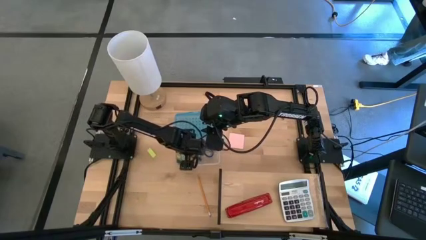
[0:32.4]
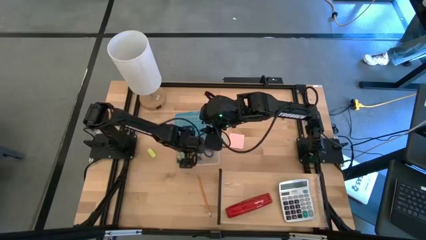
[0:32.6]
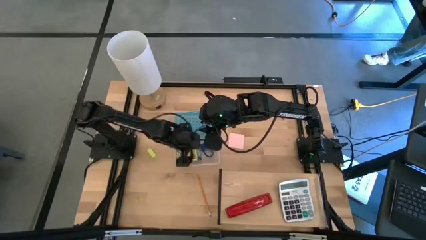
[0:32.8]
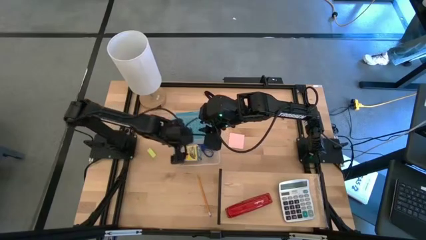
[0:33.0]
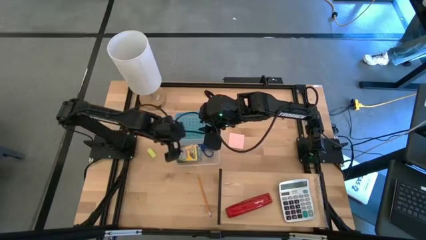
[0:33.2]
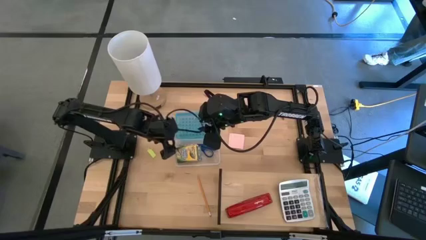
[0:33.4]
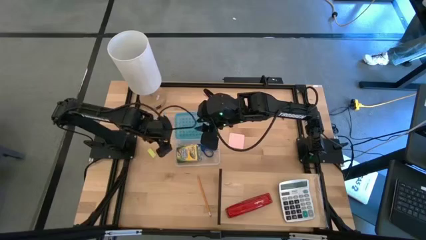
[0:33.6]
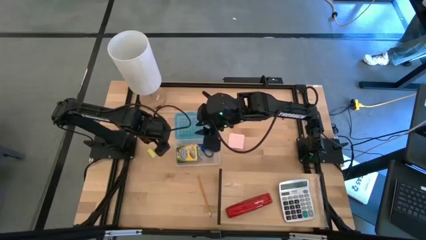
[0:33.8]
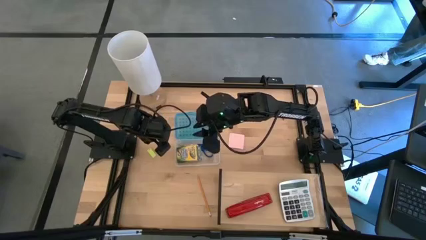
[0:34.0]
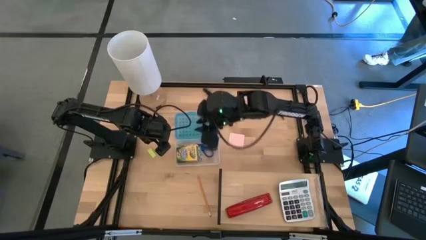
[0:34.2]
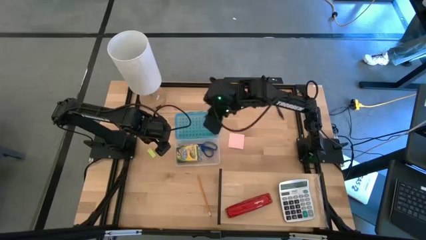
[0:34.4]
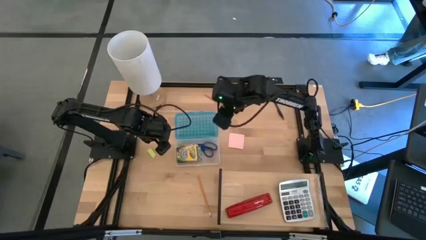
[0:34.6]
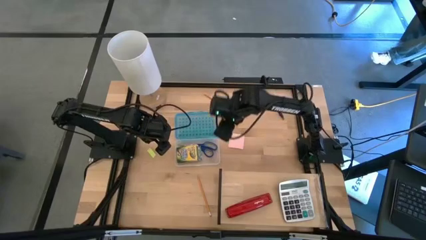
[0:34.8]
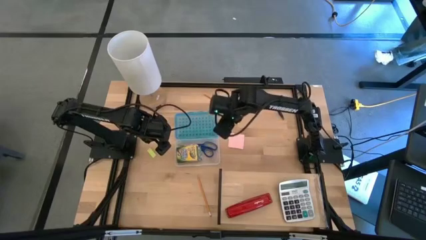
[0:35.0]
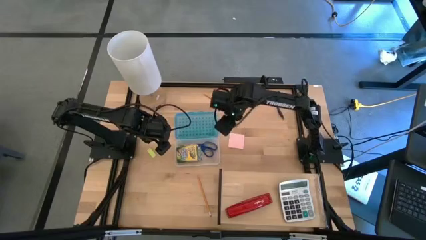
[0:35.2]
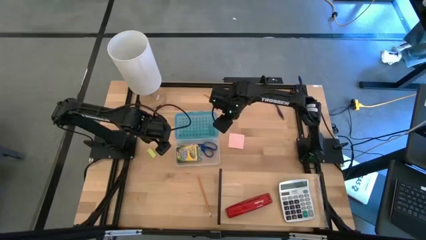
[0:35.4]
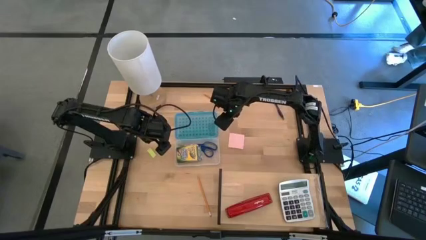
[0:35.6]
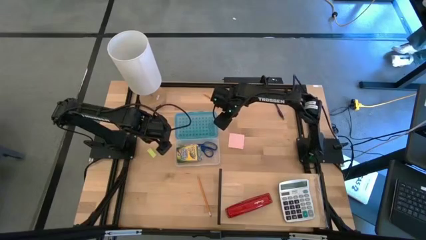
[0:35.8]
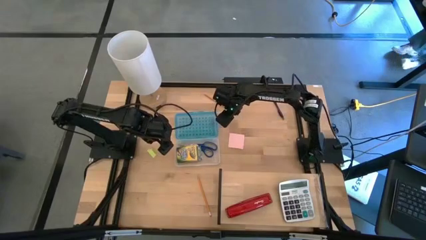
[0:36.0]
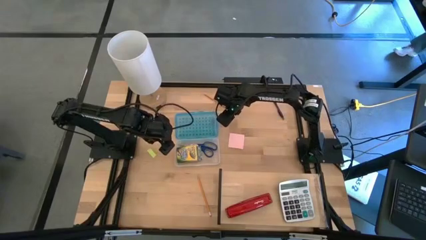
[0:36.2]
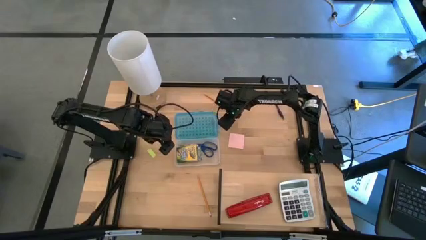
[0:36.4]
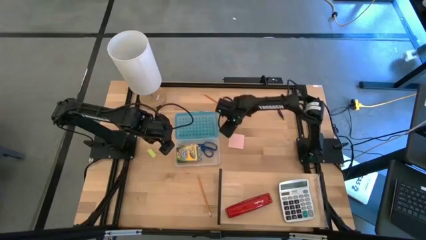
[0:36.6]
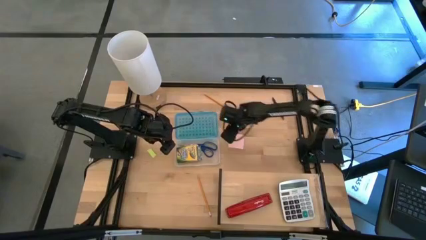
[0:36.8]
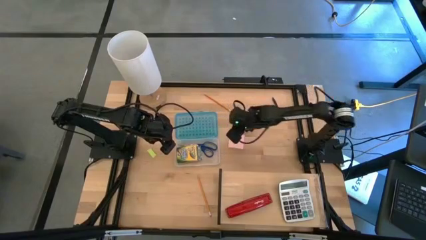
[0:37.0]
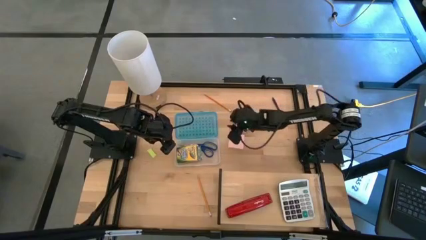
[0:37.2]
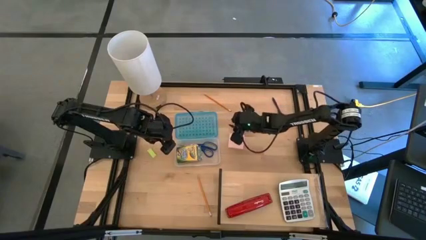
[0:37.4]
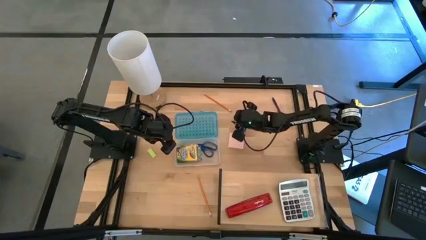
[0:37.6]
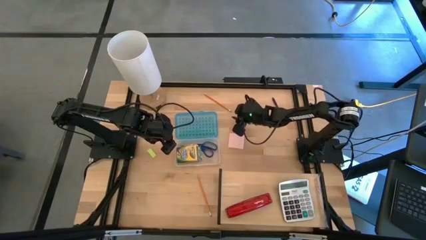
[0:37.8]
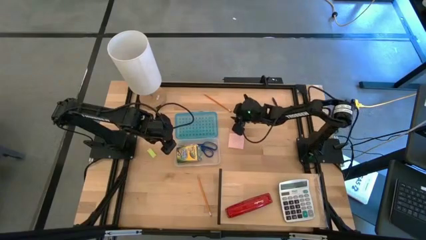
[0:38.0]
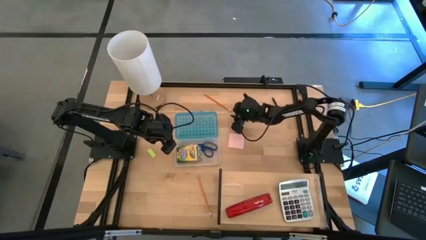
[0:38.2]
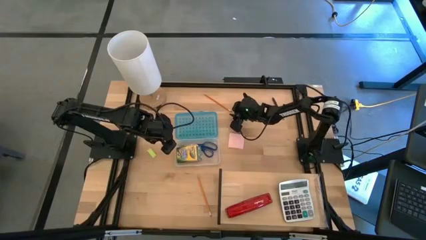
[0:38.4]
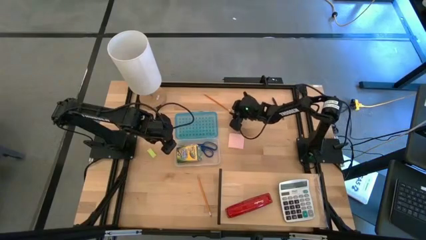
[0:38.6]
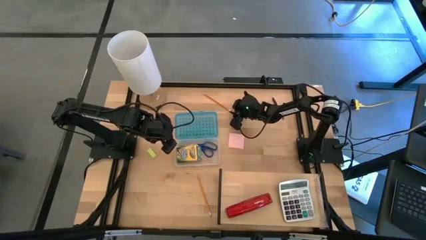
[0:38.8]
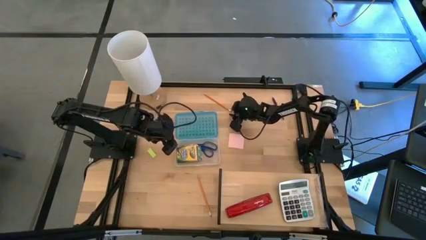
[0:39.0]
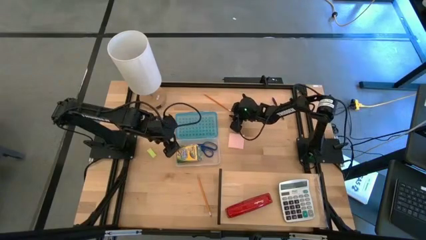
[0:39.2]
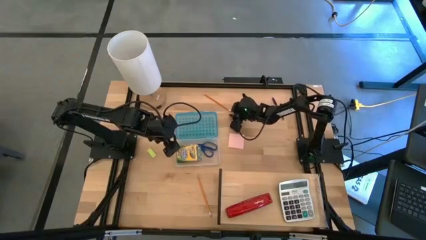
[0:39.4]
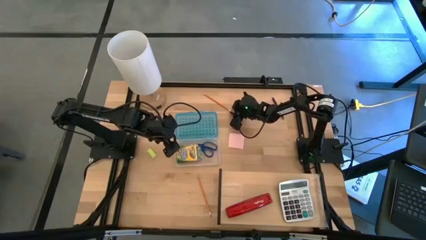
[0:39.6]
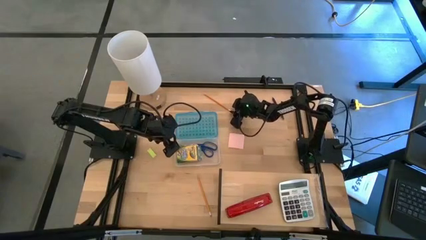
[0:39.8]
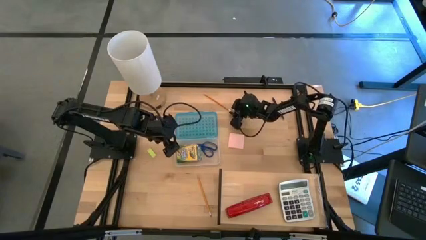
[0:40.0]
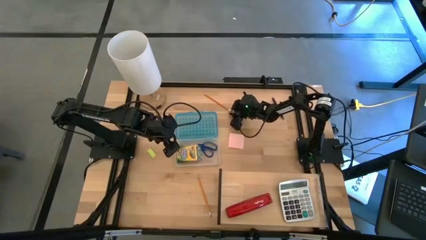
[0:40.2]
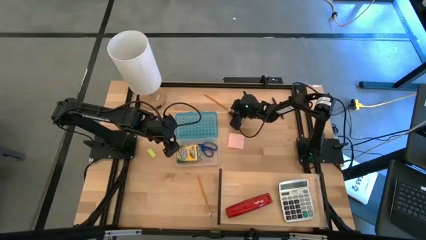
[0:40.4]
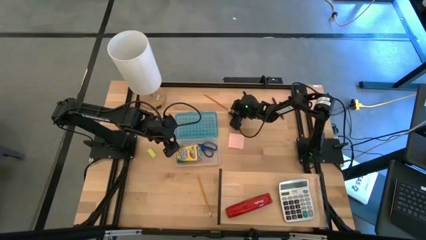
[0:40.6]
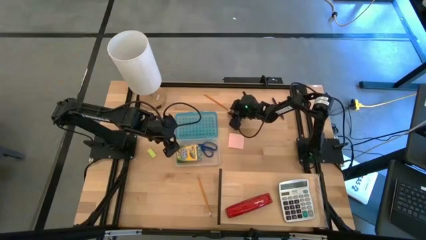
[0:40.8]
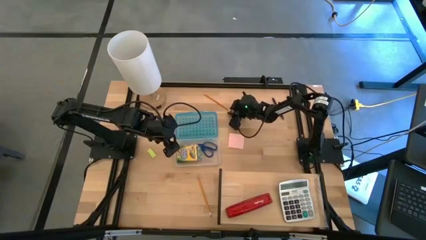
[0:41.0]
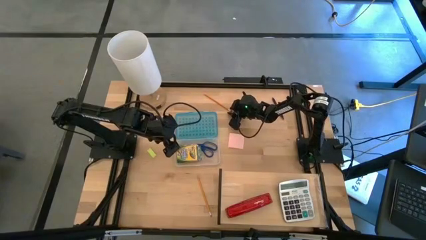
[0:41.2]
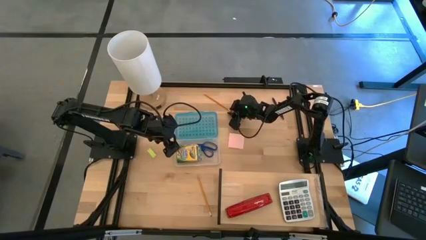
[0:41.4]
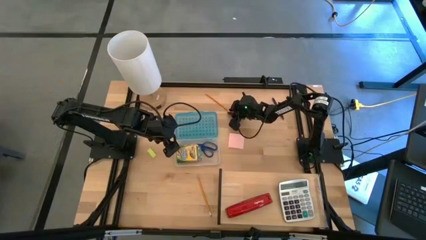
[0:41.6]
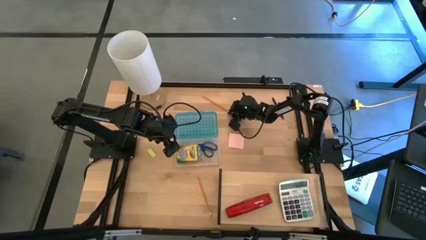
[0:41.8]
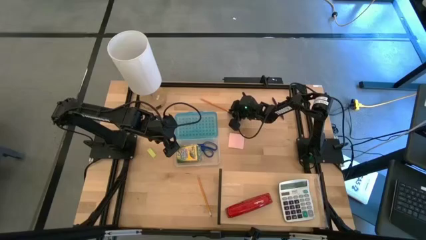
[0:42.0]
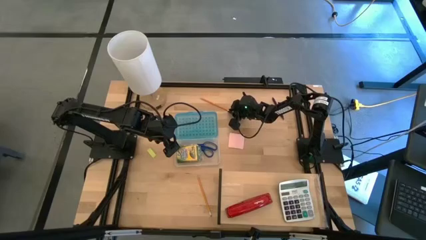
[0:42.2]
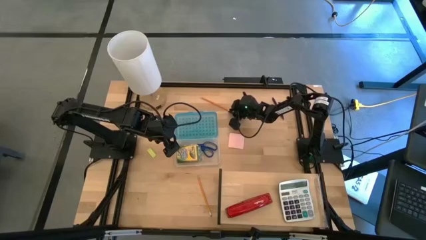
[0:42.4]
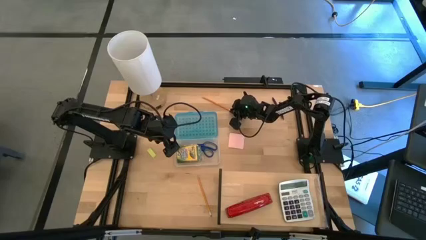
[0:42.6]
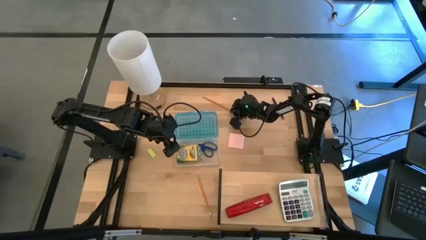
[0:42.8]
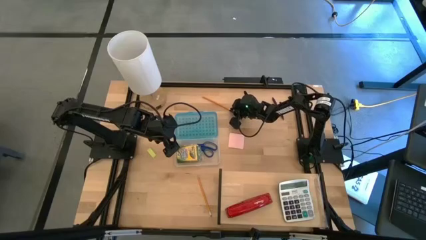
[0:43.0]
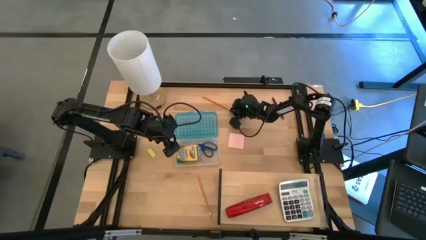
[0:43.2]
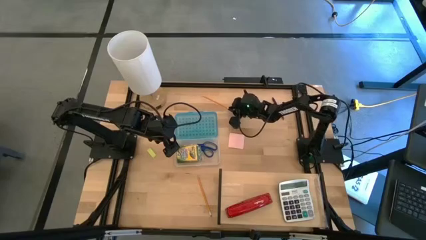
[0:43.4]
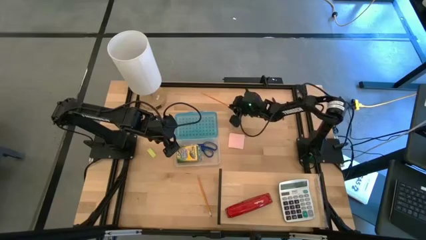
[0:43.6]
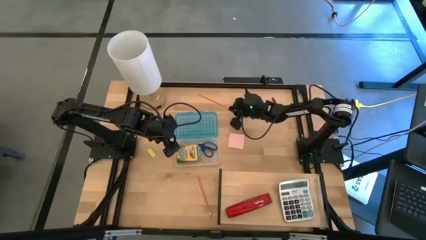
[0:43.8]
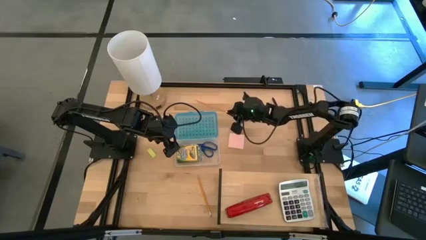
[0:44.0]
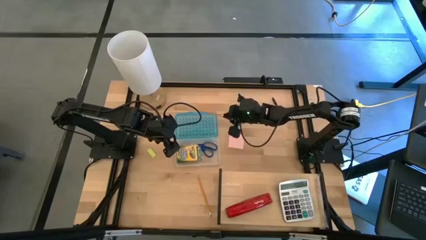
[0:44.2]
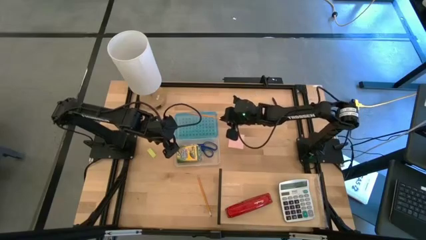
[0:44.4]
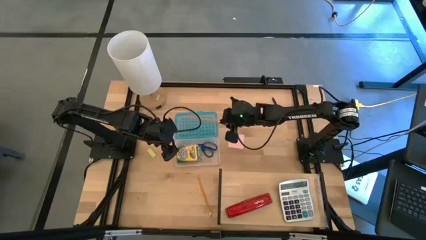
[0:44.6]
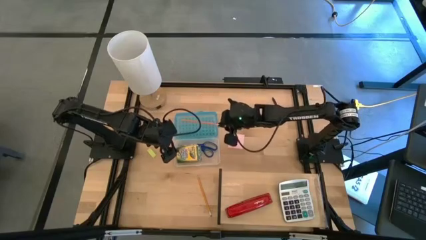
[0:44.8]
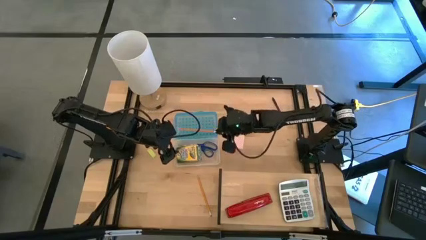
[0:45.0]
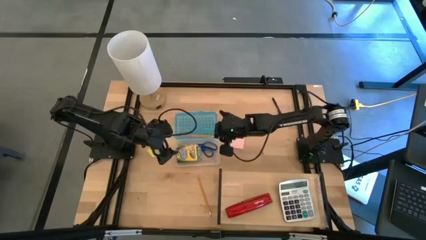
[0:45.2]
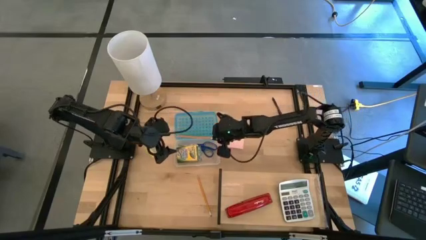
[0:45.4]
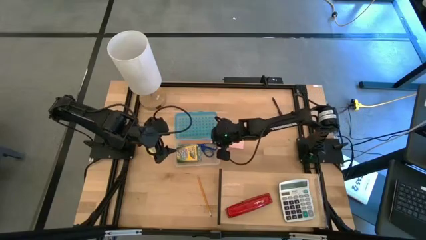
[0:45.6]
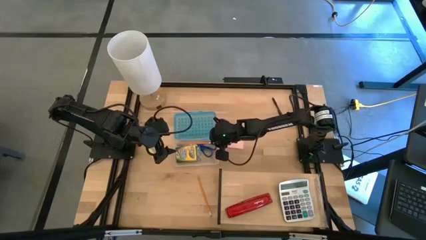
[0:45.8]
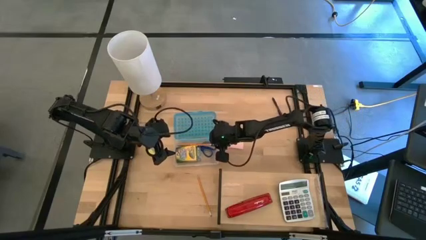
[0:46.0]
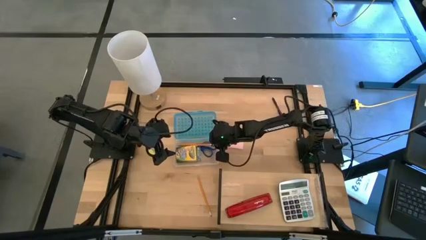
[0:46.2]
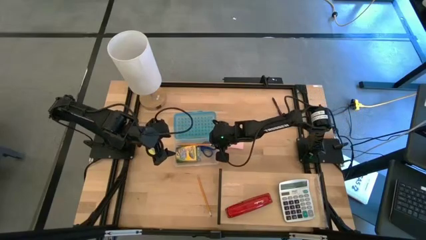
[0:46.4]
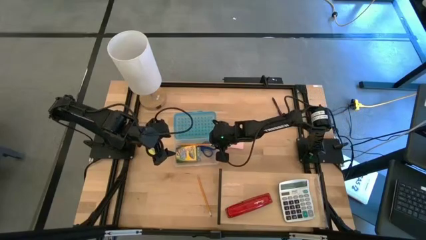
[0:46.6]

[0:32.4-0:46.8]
Task: Pack school essentials
Put the top orange pencil into the blue supply box

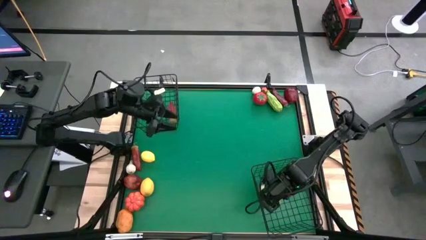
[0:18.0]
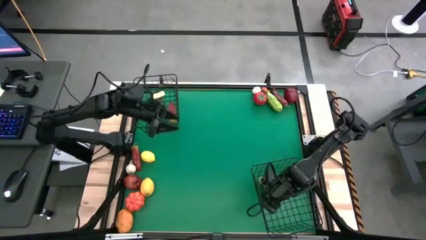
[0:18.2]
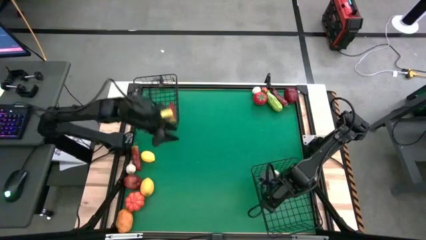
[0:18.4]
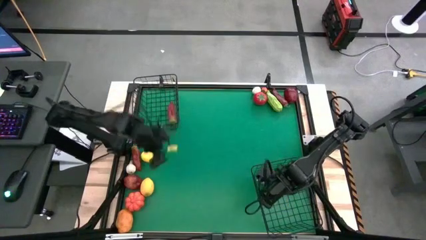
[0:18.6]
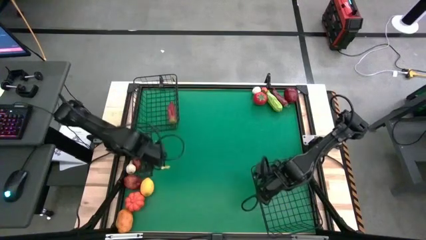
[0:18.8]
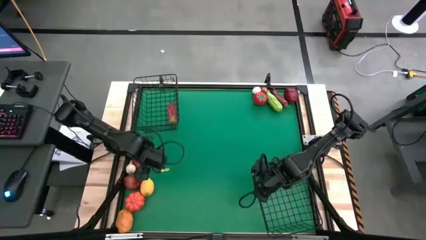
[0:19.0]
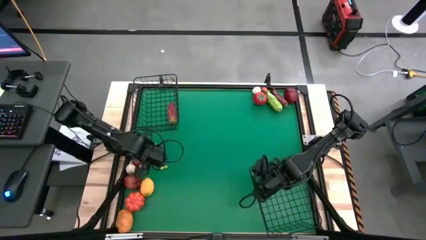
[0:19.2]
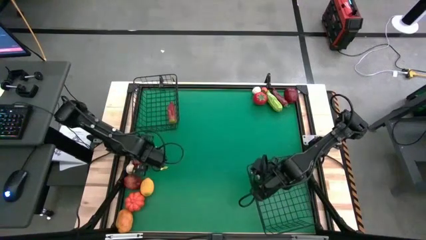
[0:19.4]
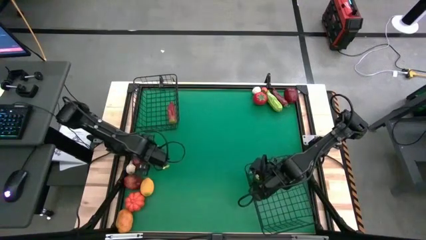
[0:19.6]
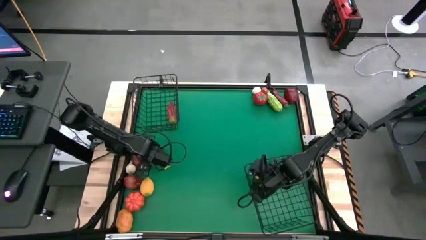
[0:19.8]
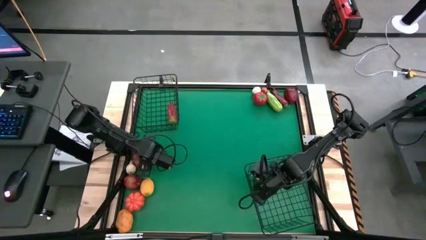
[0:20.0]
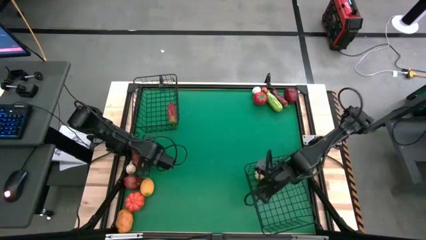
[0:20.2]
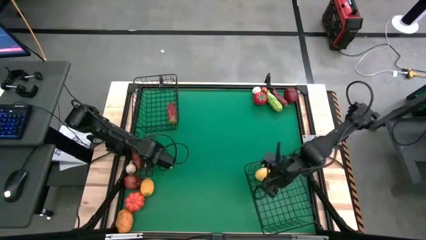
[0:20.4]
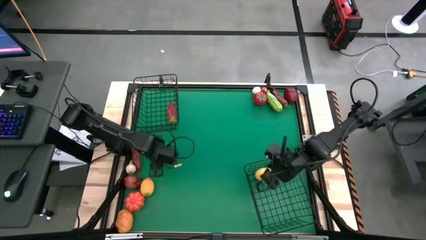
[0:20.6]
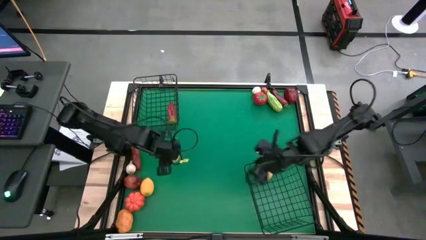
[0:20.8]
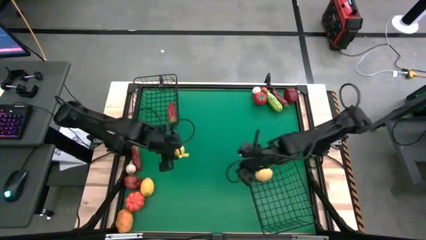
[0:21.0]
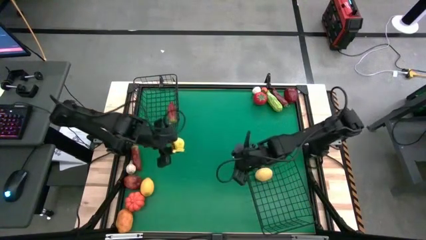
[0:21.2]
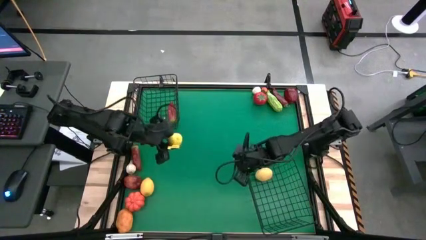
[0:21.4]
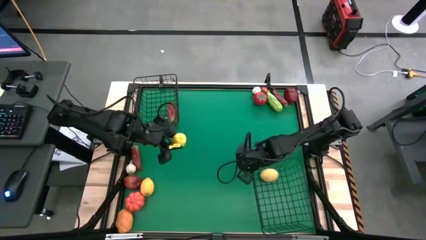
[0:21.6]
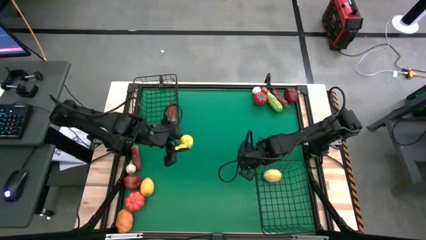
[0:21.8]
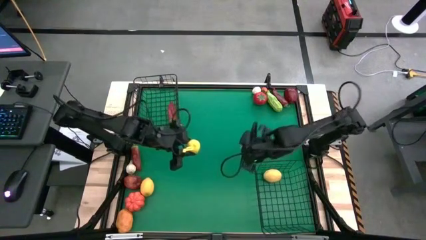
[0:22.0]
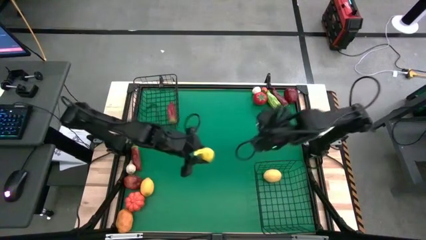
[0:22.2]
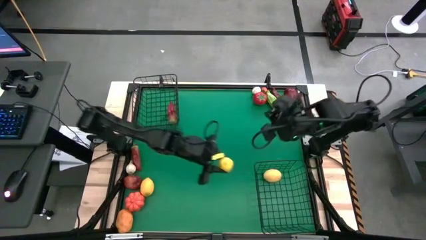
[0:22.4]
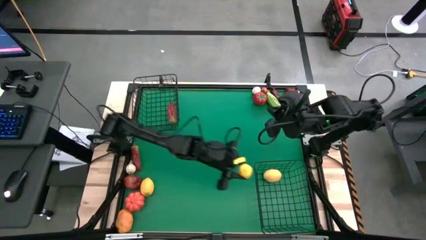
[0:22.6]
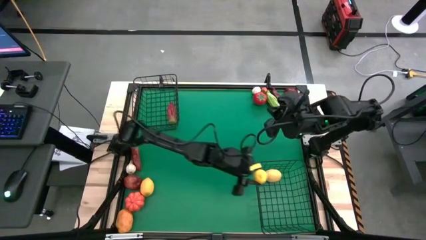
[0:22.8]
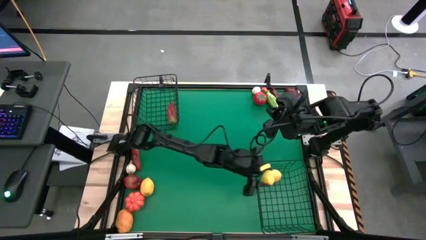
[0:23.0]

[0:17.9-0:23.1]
Task: Sort produce into baskets
Put the top yellow lemon into the bottom black wire basket
